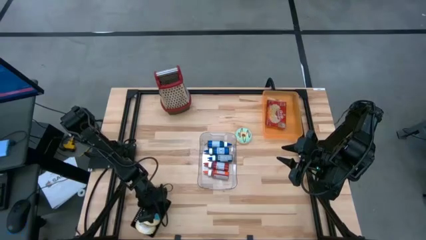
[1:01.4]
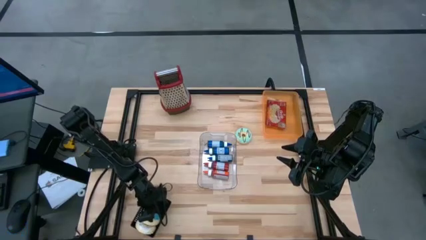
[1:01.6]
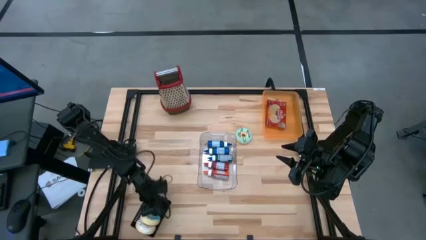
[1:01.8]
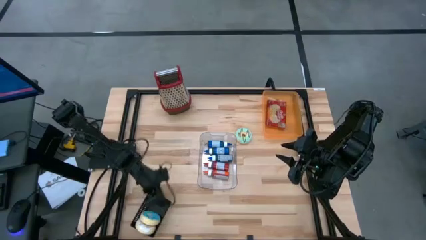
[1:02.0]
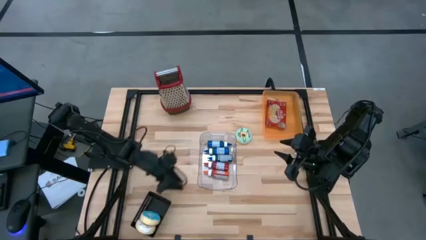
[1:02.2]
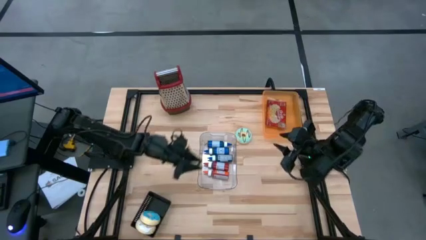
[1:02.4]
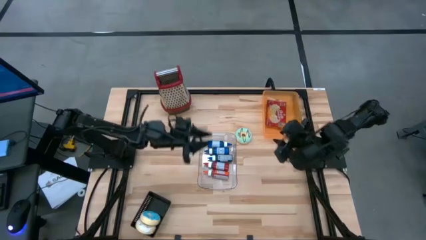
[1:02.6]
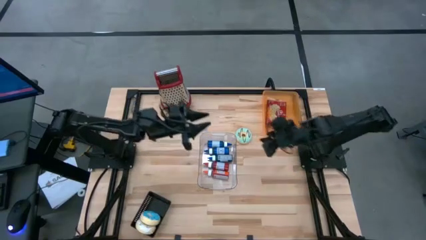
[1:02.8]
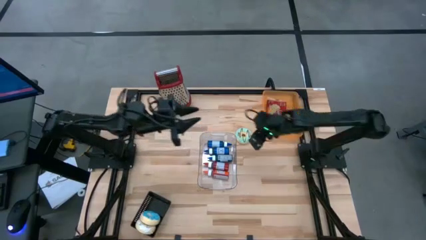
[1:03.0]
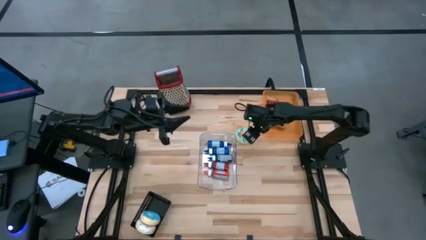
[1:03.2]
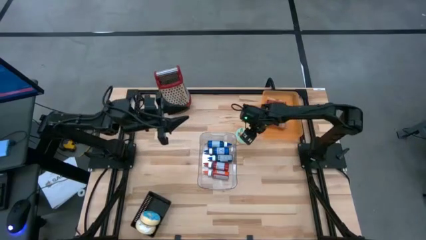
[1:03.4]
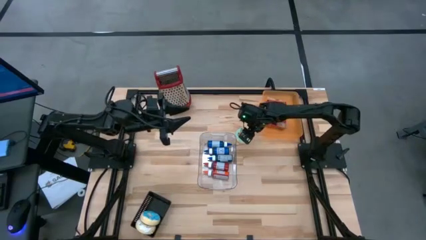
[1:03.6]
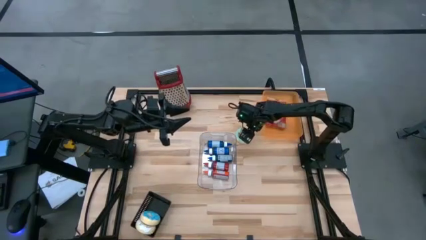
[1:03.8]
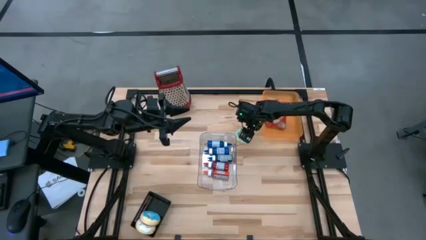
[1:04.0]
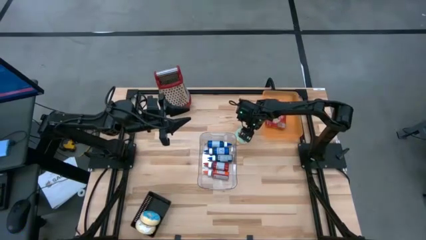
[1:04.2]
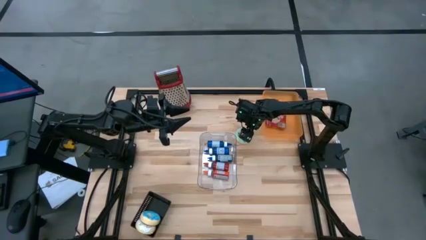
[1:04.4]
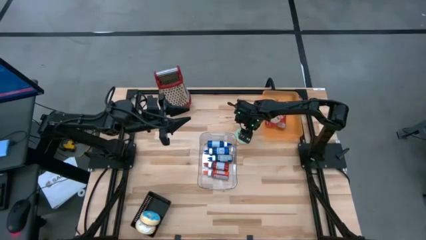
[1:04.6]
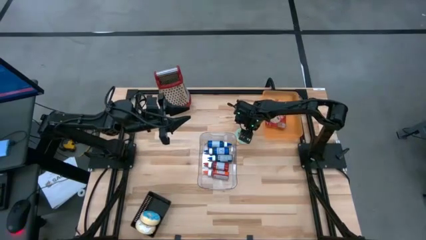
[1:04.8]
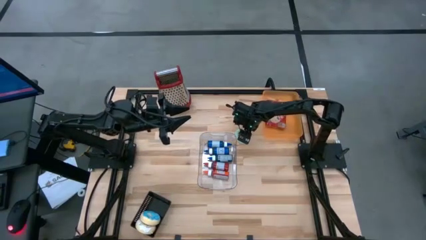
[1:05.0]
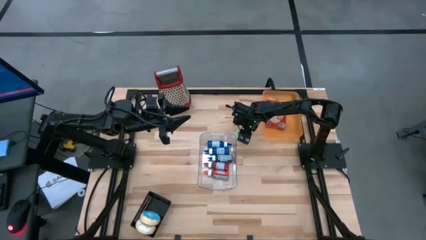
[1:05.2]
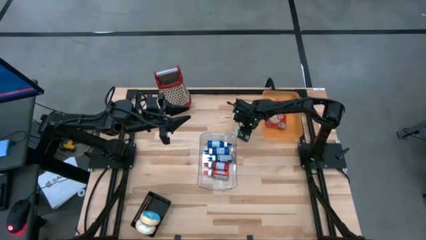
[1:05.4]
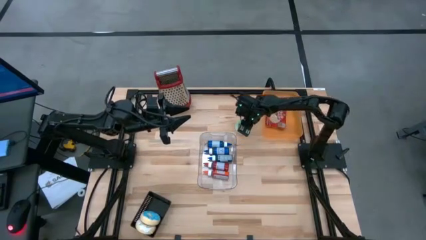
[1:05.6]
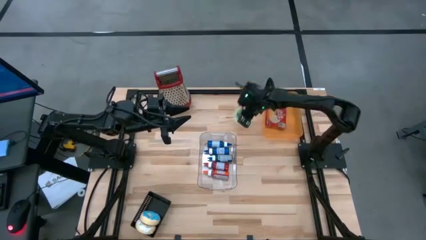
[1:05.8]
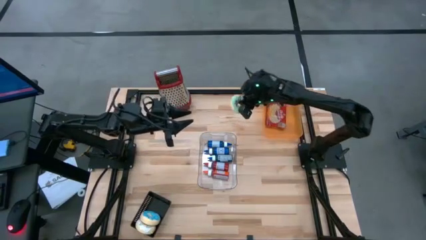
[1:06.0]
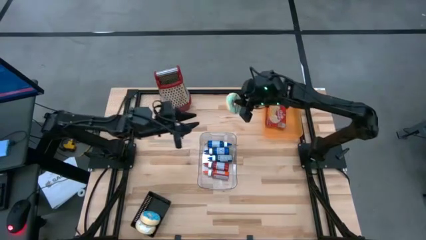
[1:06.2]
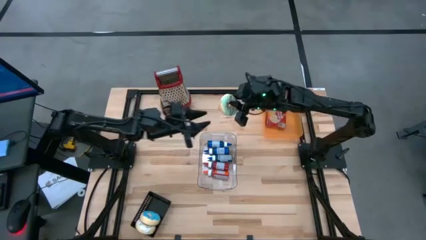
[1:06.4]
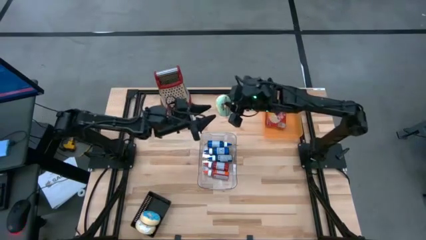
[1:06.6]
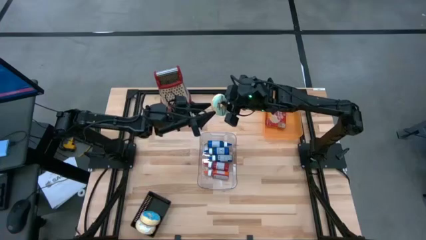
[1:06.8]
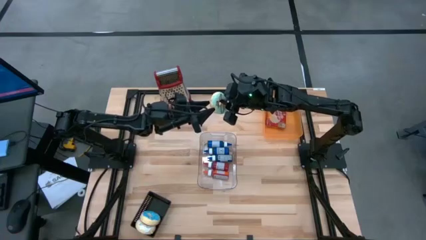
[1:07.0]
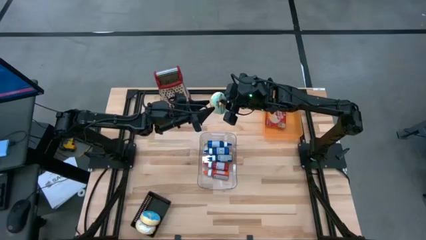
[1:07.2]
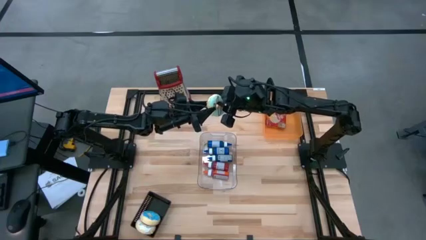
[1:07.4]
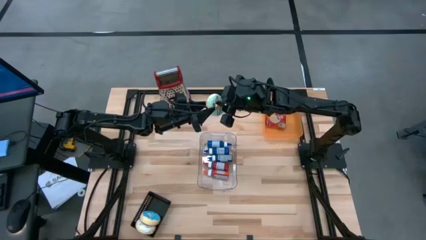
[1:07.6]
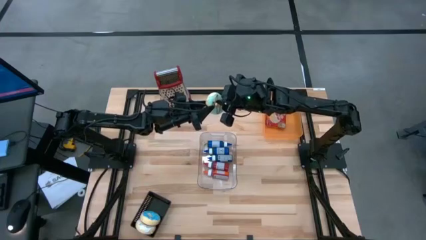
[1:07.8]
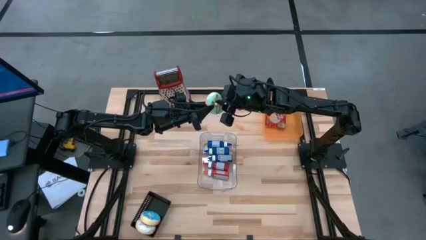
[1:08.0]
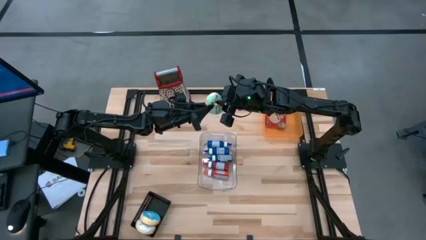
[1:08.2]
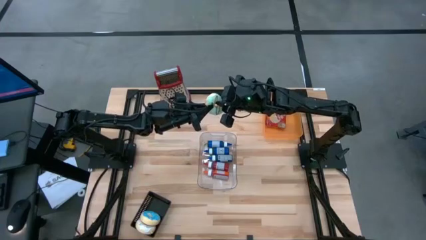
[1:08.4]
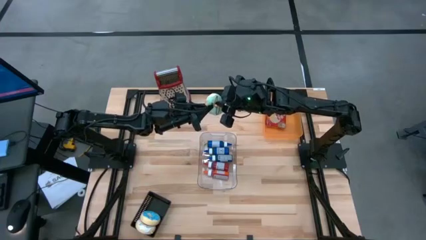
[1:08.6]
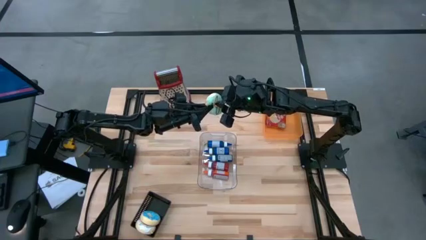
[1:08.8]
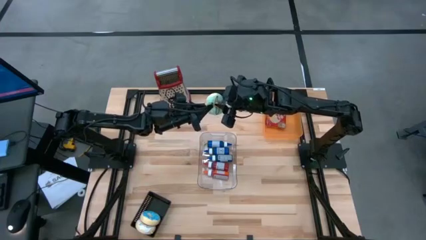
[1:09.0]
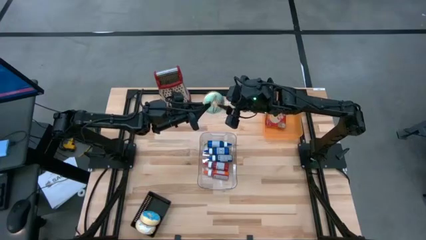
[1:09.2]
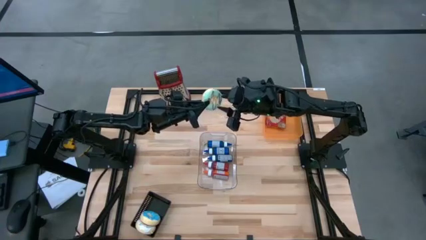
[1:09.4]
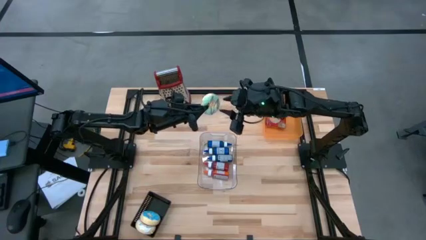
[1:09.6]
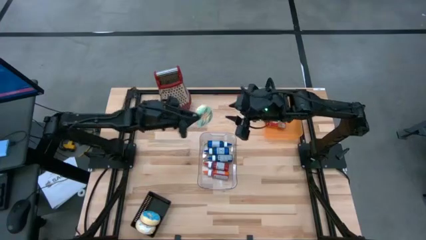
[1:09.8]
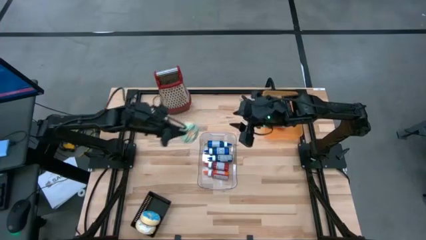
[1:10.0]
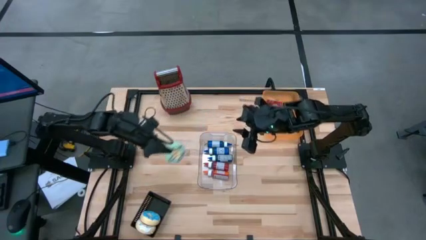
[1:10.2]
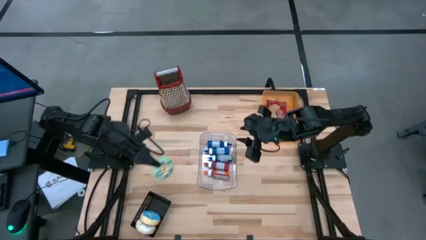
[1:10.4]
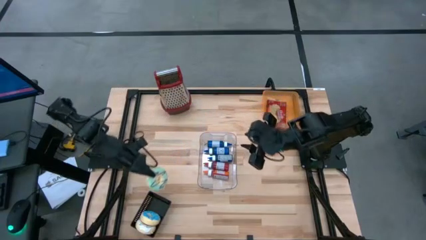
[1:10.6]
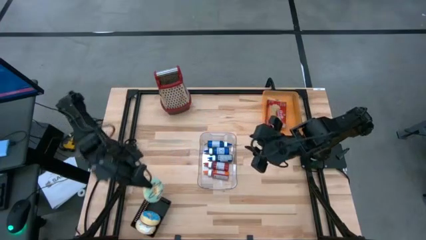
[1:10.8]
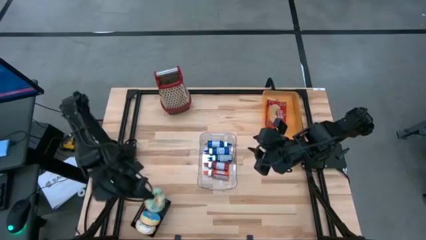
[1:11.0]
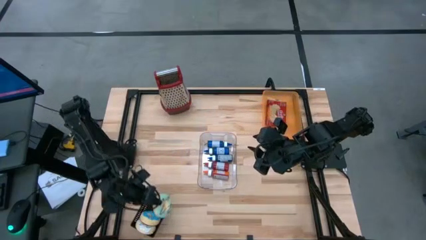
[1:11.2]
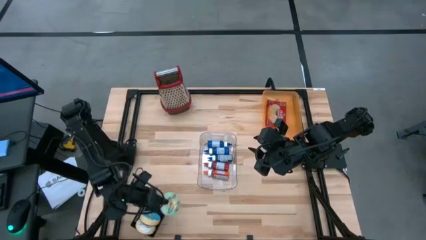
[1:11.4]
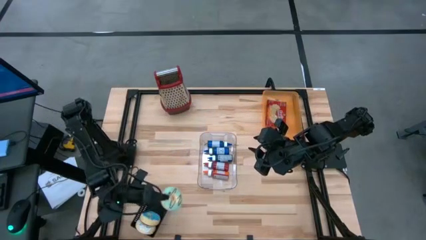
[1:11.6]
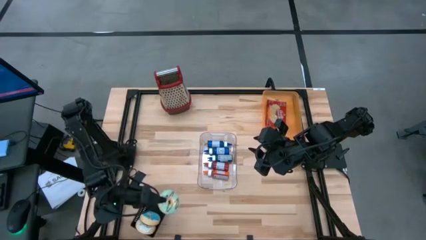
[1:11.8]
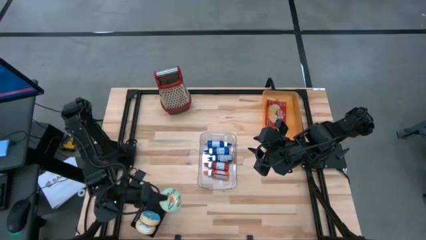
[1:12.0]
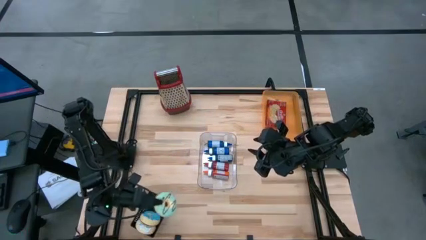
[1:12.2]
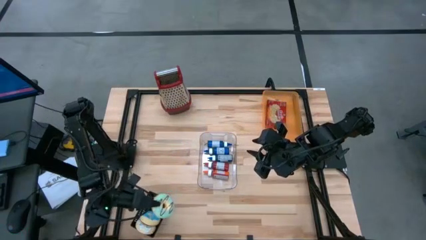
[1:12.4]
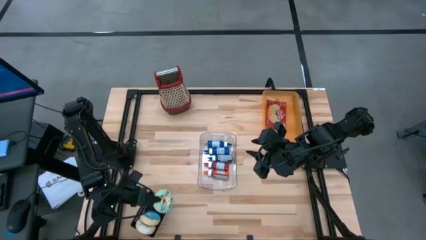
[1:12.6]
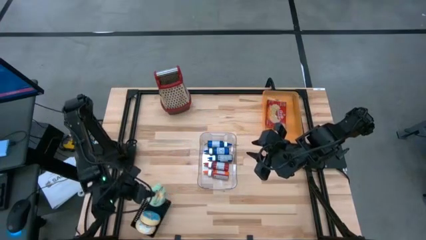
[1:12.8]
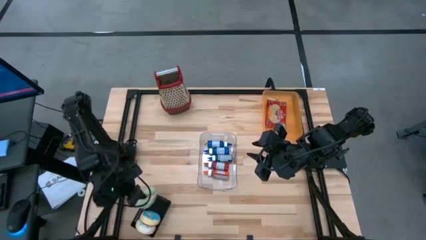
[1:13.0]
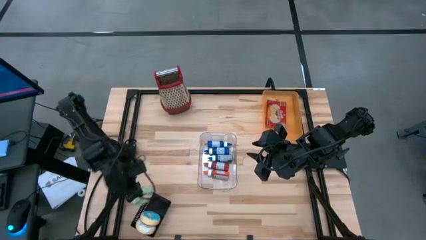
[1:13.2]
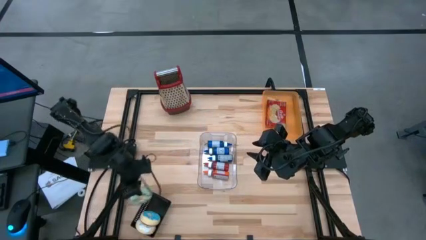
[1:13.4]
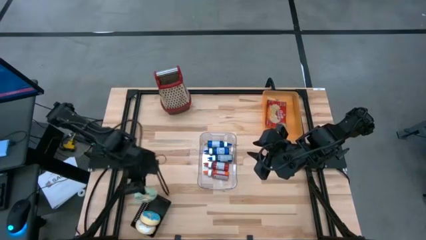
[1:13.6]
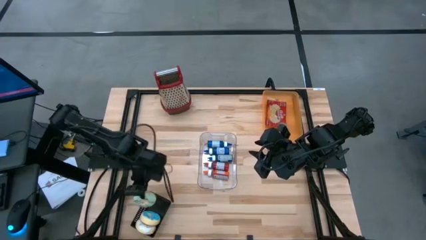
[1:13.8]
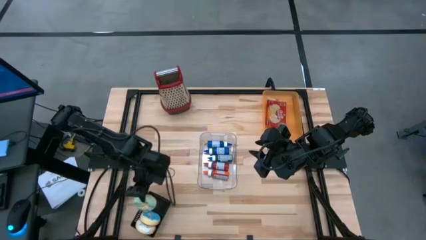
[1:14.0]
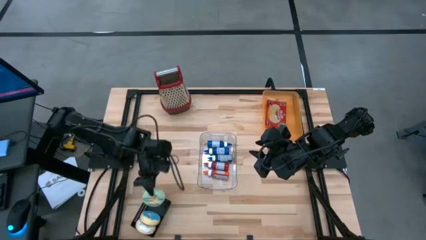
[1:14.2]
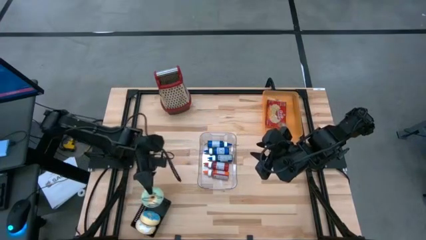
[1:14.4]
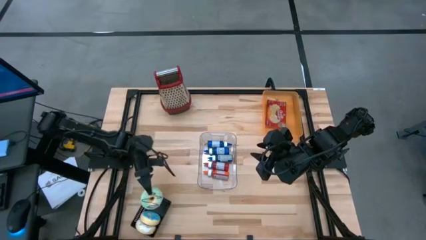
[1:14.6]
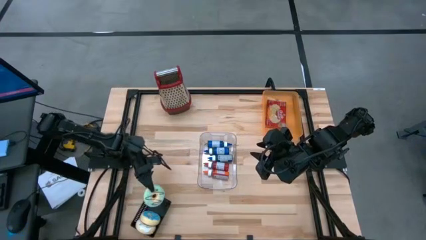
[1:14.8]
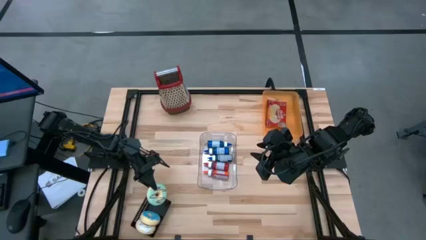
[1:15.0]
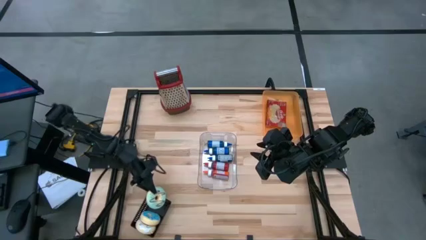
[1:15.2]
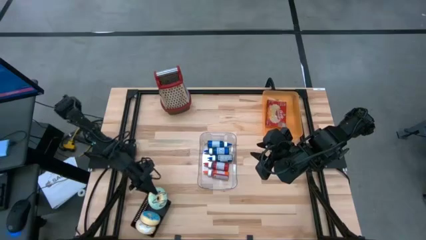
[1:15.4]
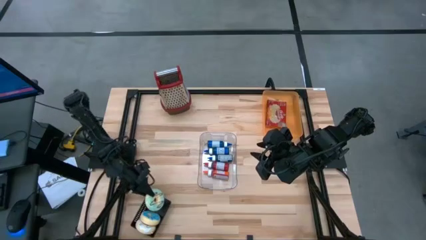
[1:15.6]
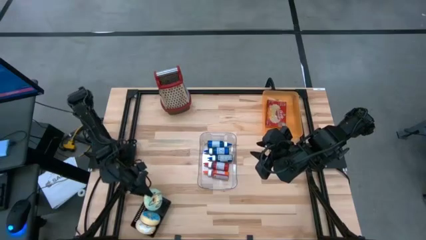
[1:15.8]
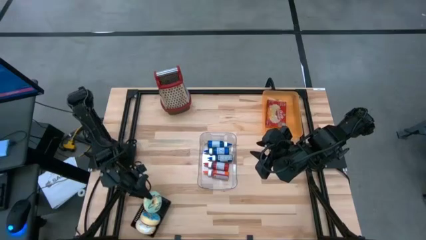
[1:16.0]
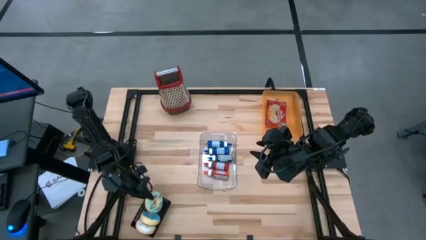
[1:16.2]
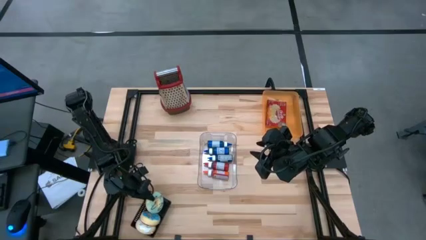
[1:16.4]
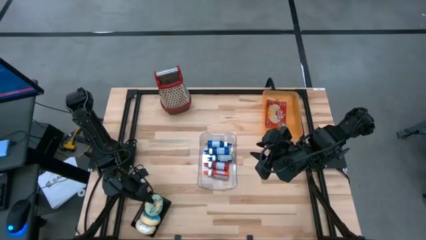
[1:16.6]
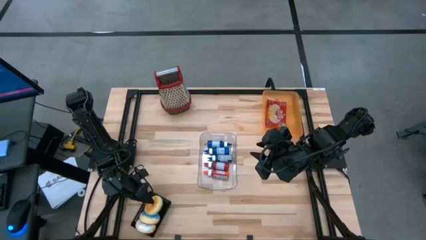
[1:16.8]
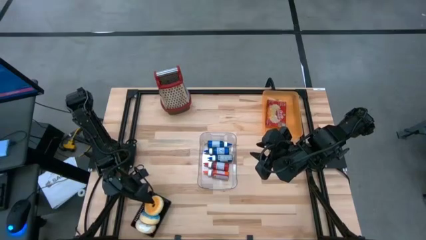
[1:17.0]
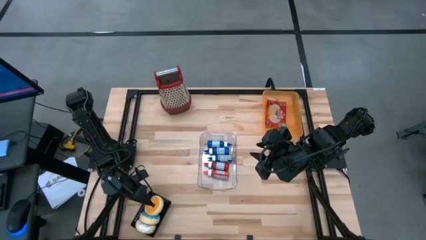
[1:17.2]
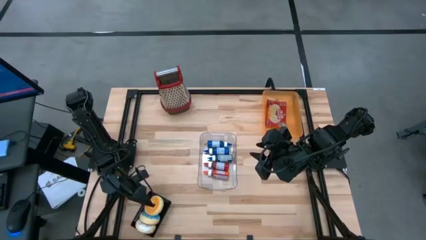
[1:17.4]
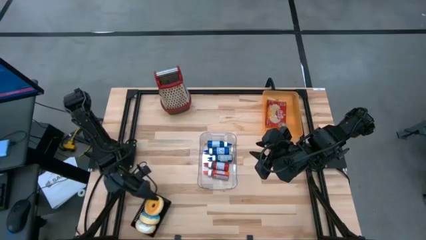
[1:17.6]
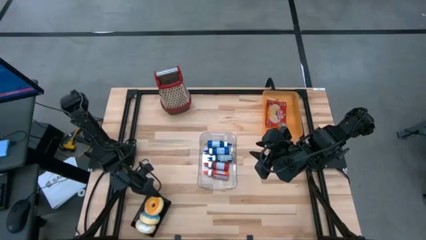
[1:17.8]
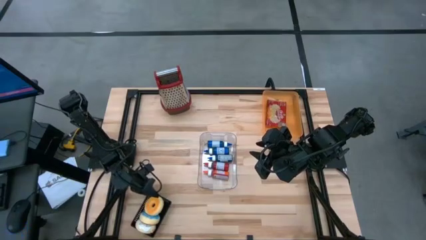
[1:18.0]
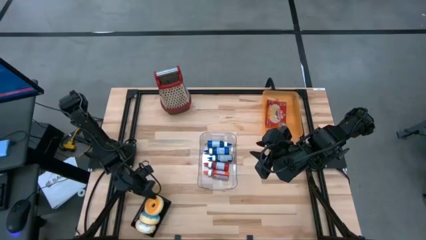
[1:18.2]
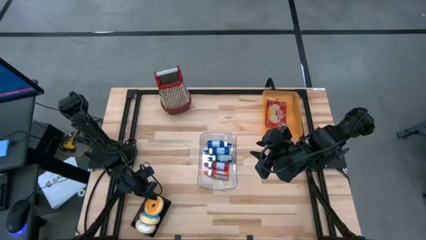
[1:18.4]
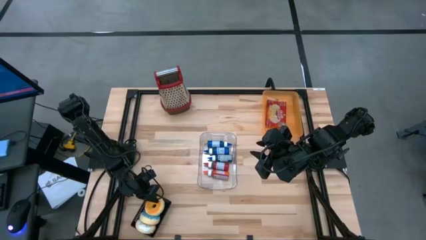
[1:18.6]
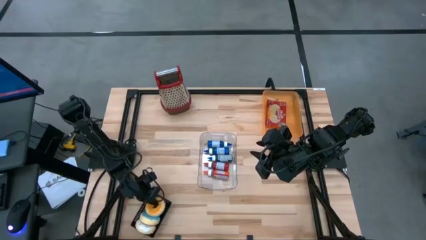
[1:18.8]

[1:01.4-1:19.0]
Put the green donut into the black bin
